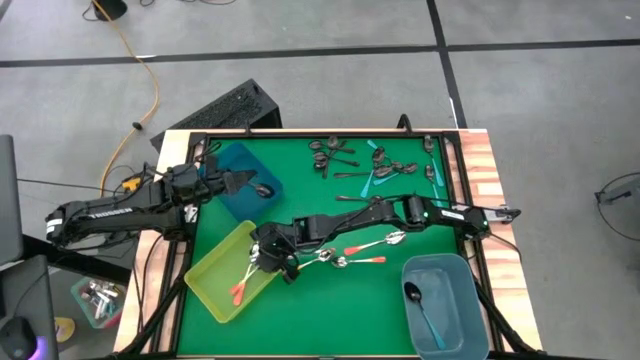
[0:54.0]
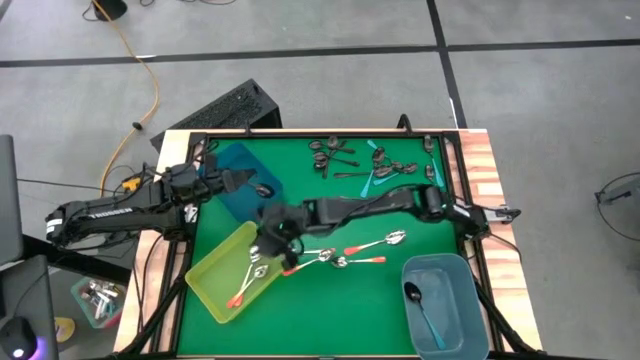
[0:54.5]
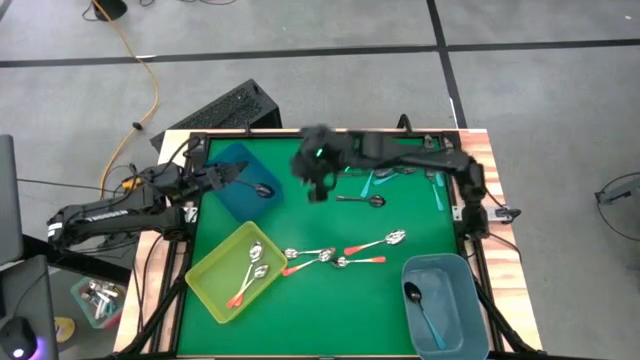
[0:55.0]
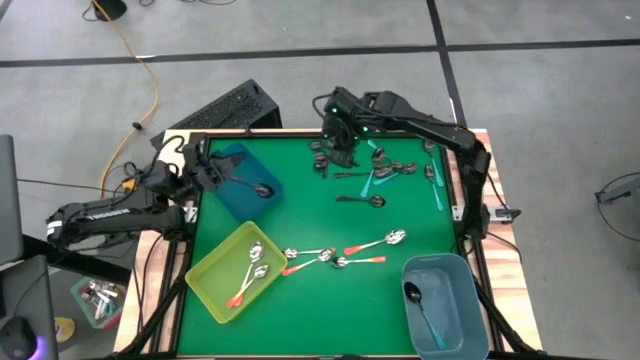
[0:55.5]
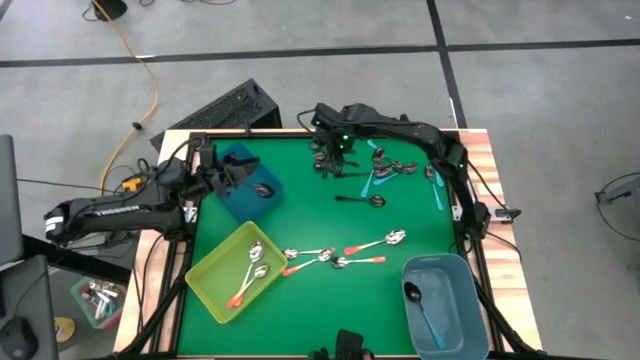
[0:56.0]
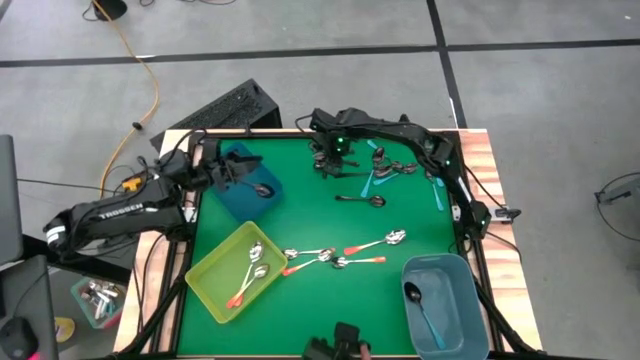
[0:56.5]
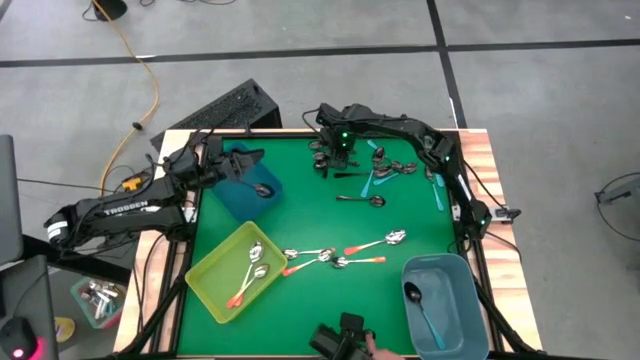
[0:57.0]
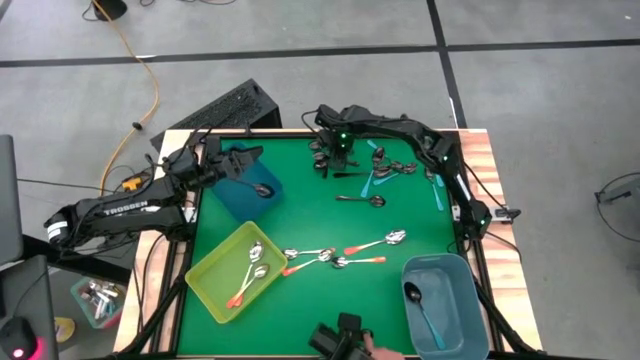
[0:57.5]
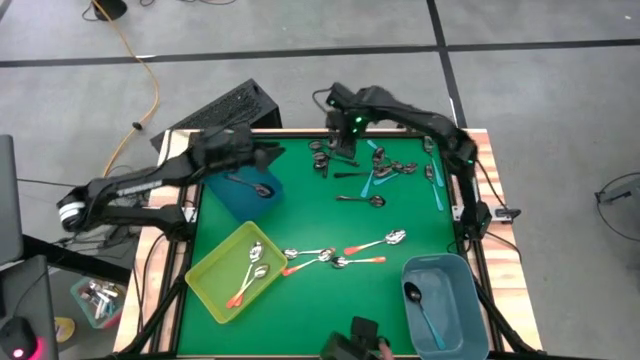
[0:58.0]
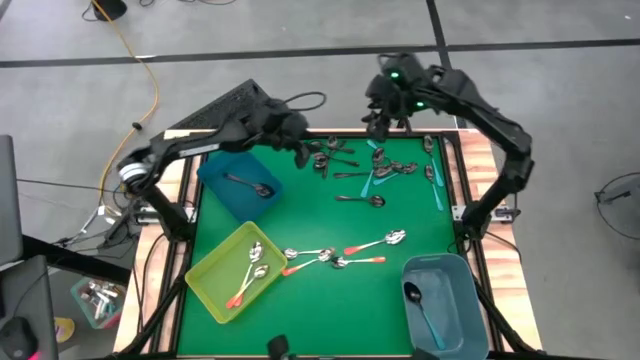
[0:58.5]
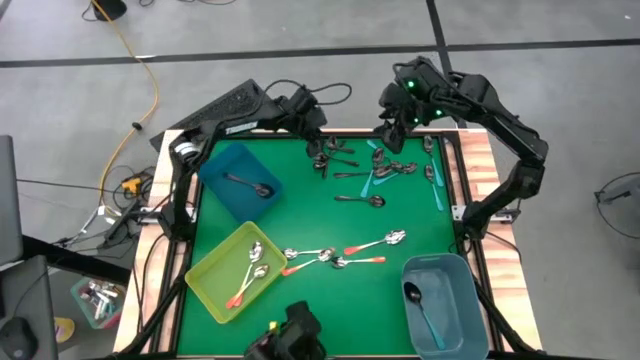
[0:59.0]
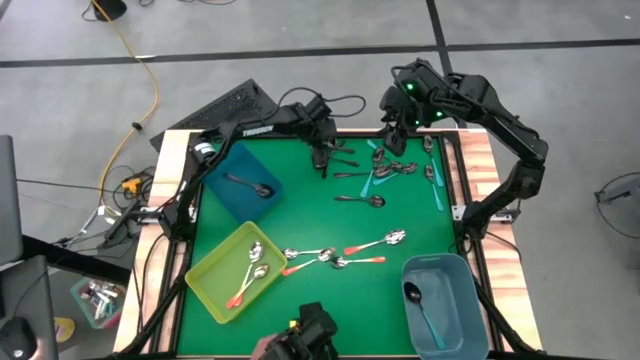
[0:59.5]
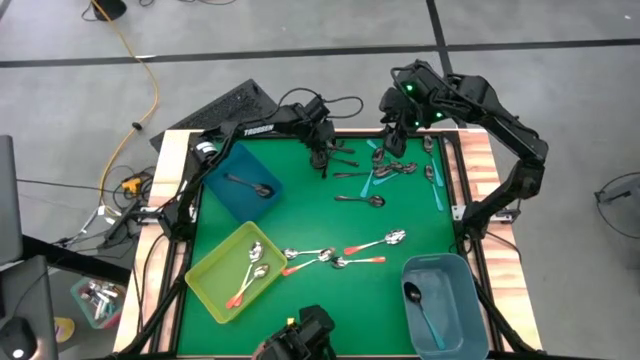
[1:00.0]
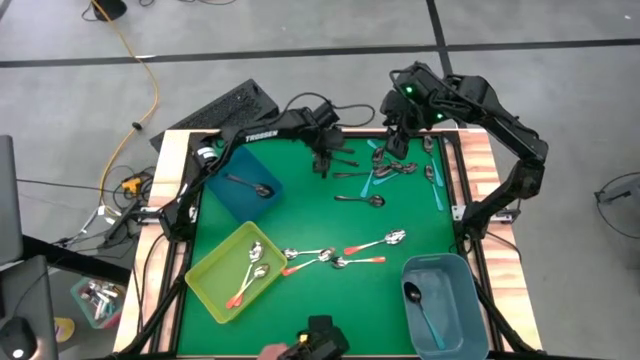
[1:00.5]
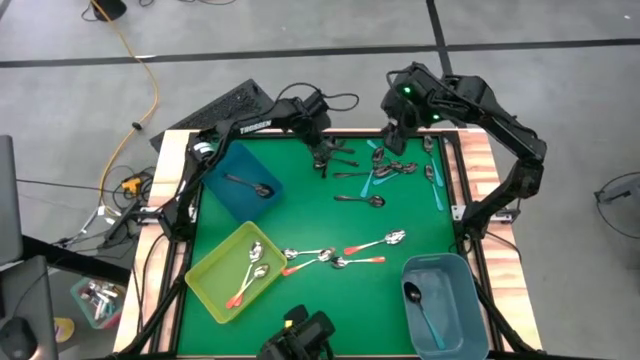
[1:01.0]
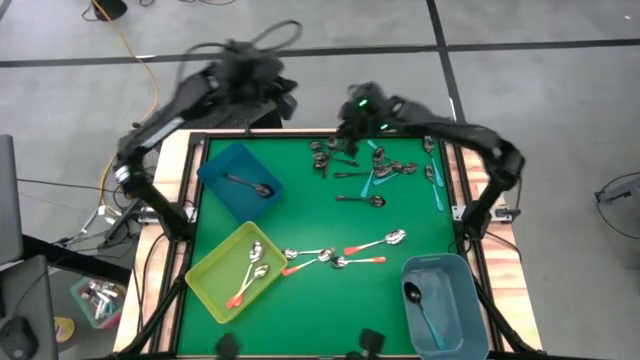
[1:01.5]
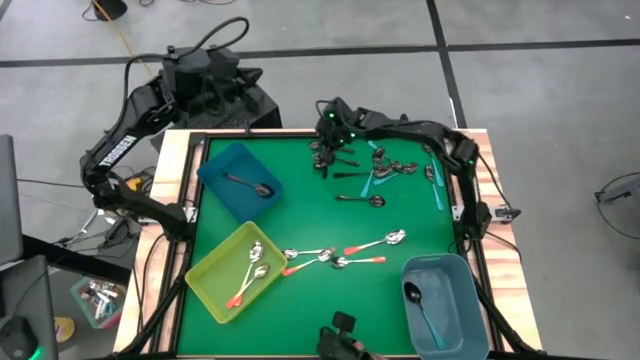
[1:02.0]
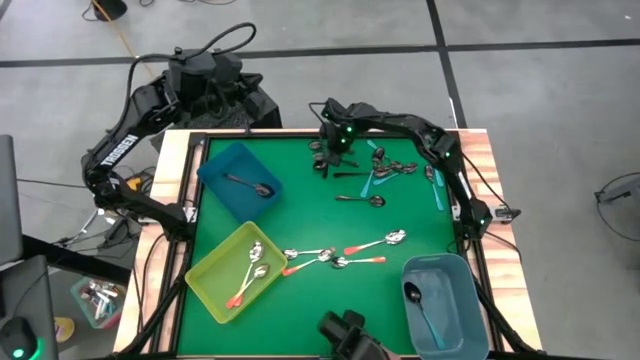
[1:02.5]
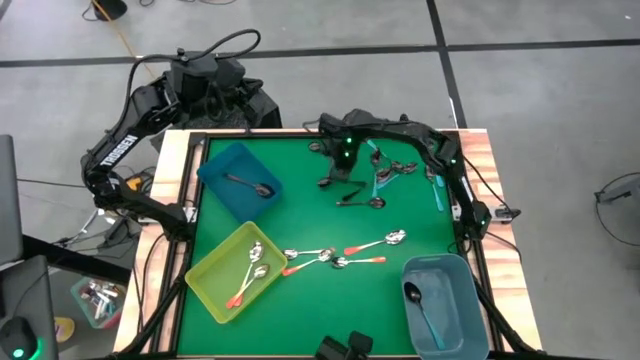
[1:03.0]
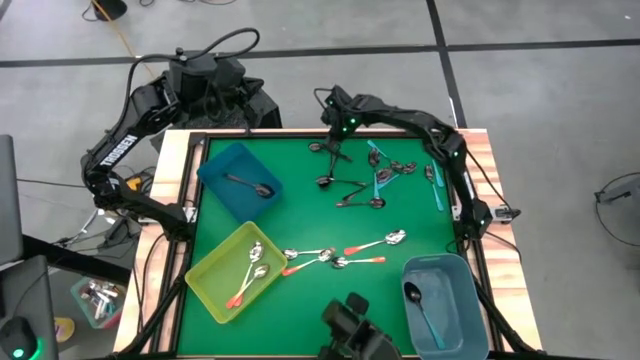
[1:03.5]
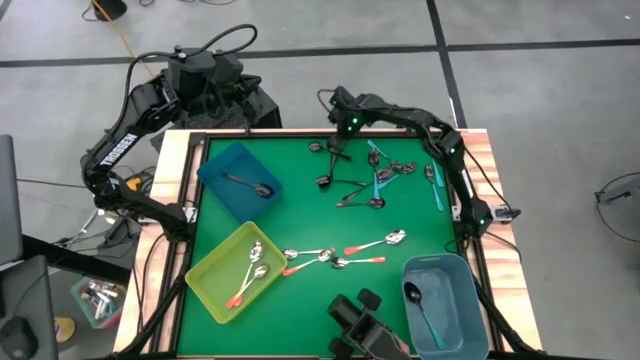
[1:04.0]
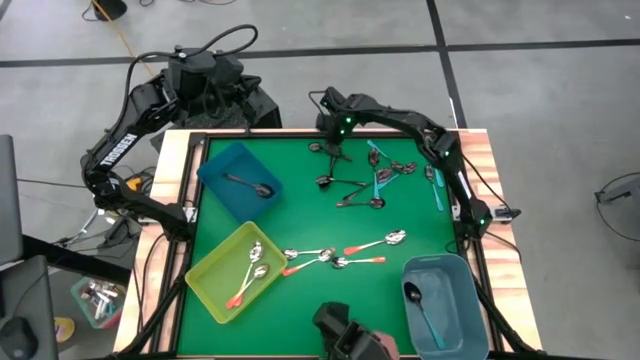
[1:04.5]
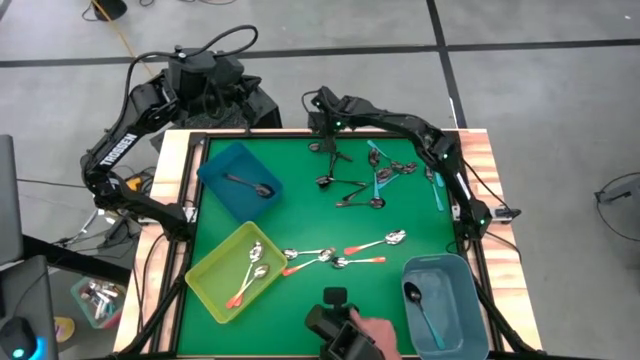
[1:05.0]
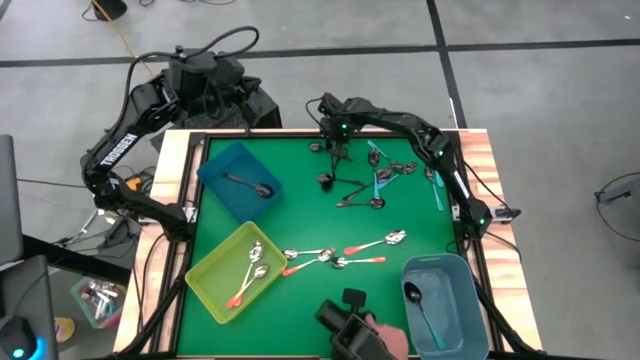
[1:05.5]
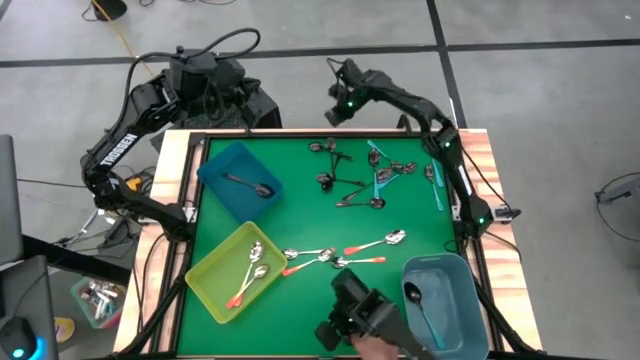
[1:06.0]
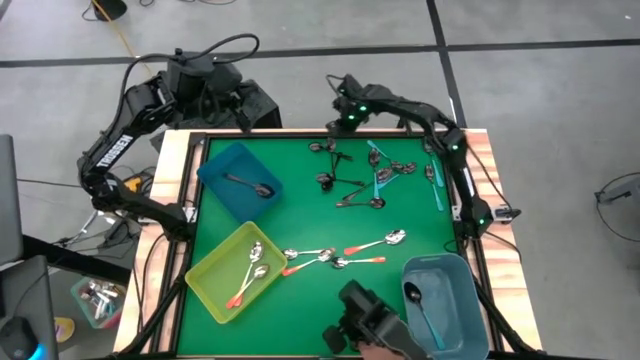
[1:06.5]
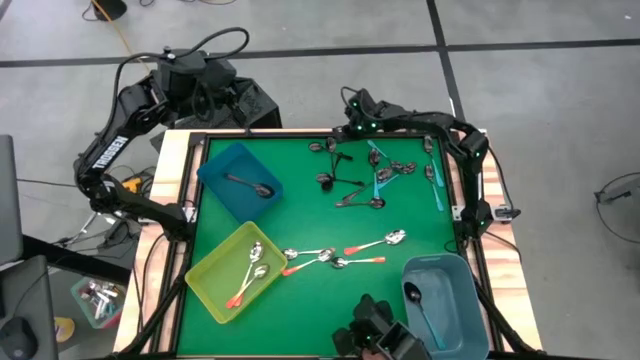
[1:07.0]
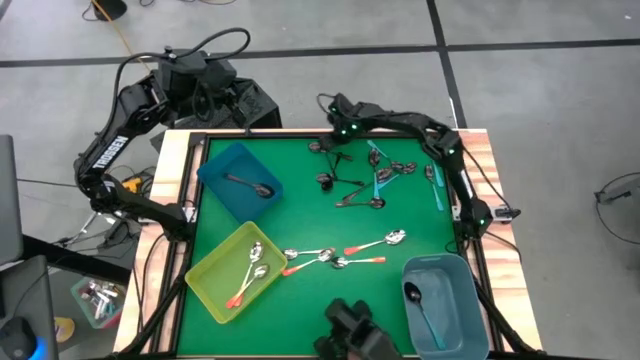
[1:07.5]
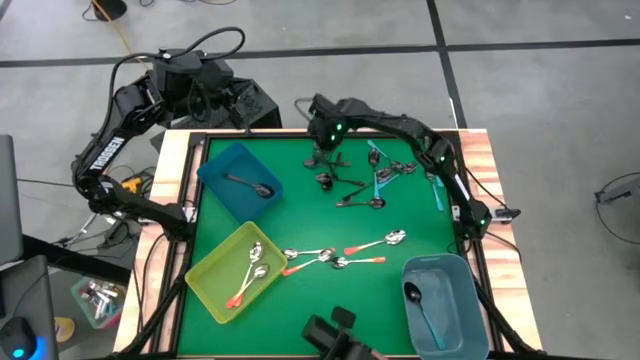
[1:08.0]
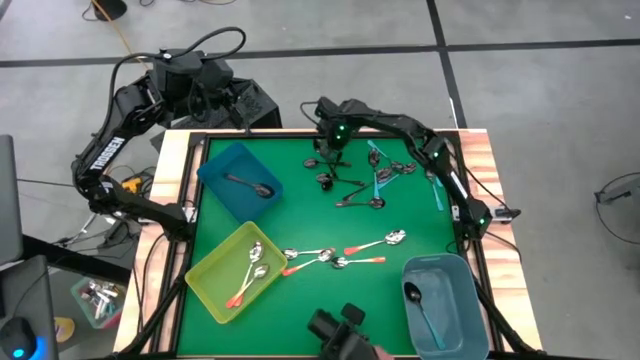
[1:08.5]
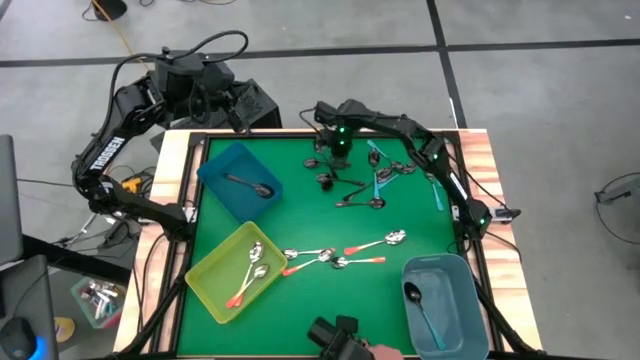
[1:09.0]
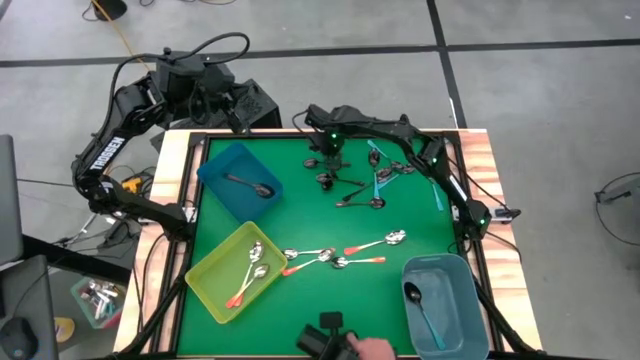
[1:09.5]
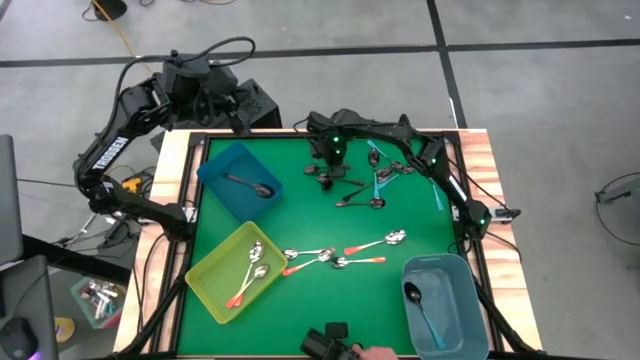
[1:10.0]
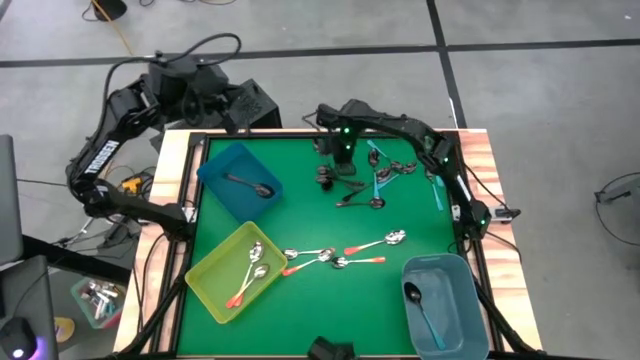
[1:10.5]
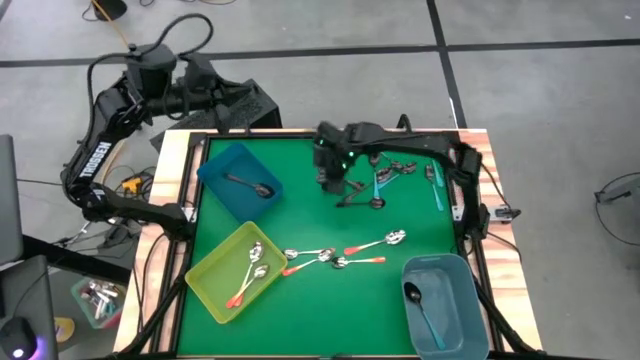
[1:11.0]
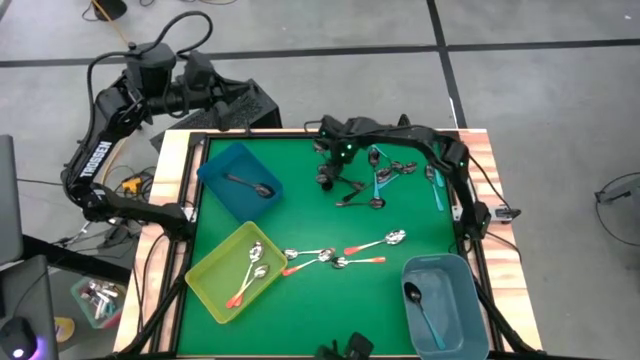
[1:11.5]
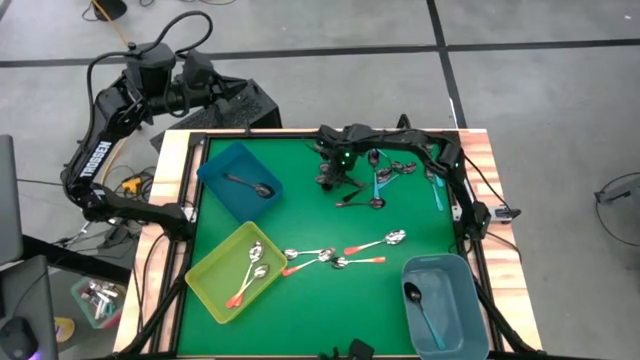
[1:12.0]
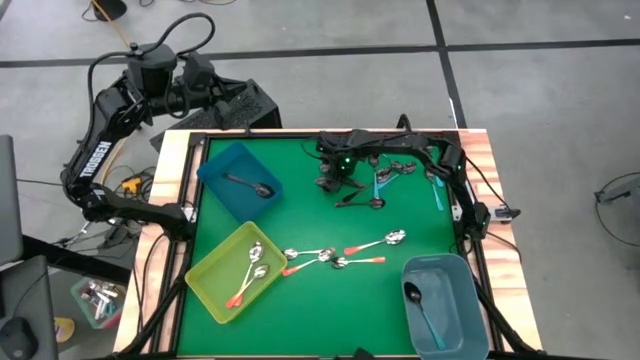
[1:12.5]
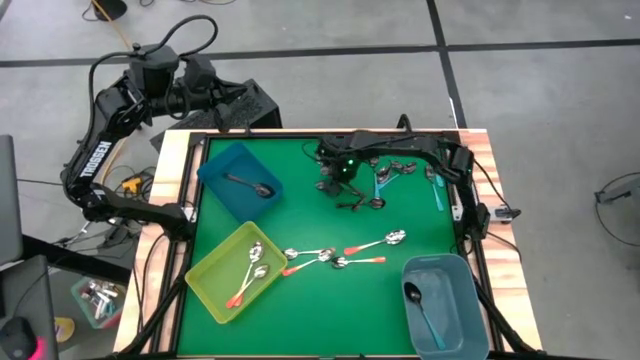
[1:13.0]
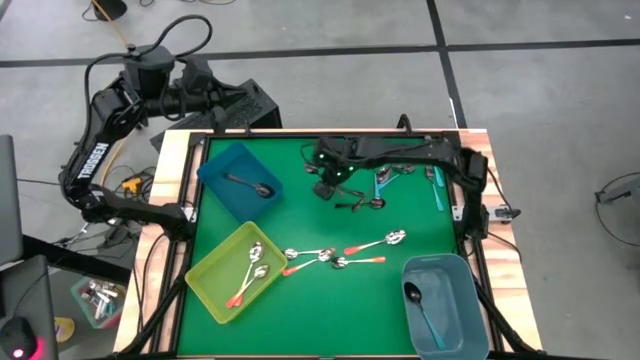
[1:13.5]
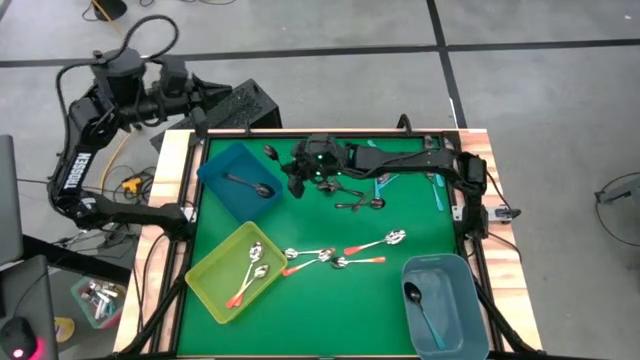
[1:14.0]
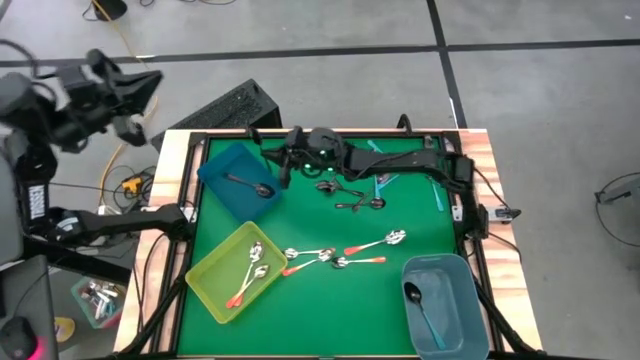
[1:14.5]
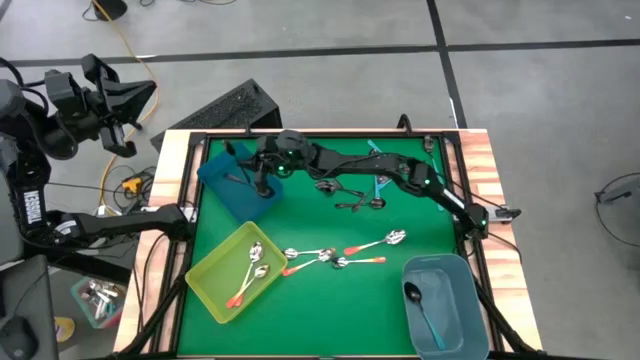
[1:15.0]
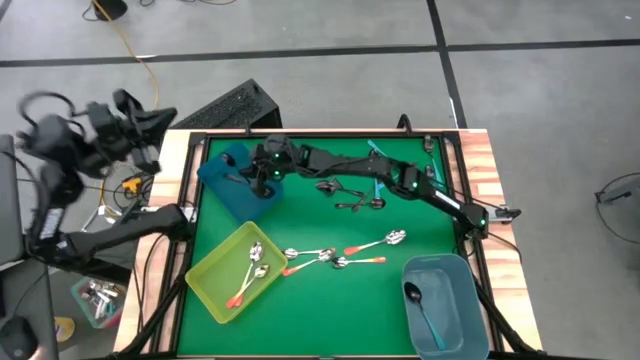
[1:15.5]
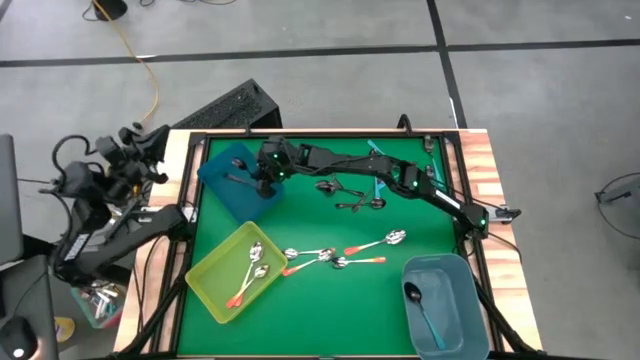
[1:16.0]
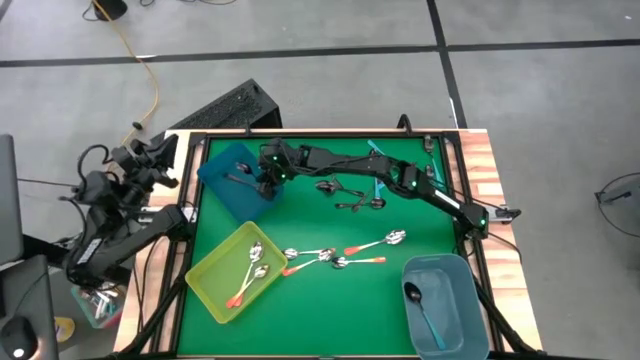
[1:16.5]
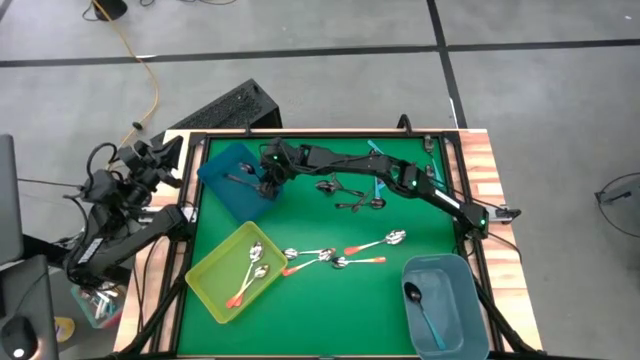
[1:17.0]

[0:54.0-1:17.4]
Task: Sort silverware by color (type)
Put the black spoon into the dark blue bin
